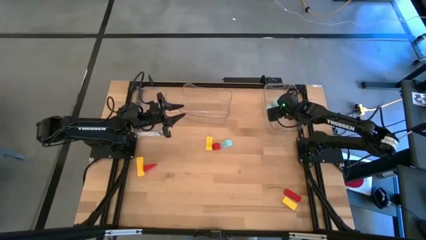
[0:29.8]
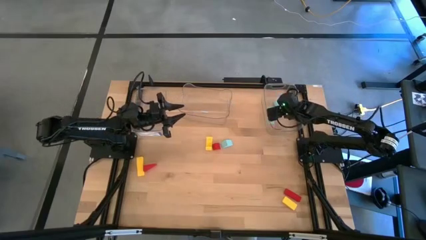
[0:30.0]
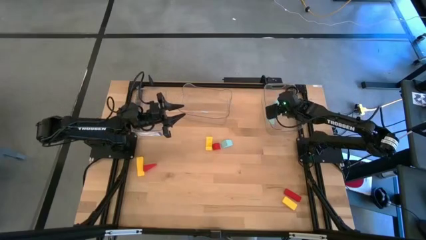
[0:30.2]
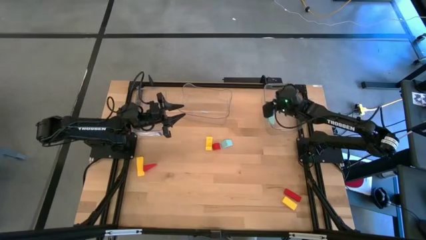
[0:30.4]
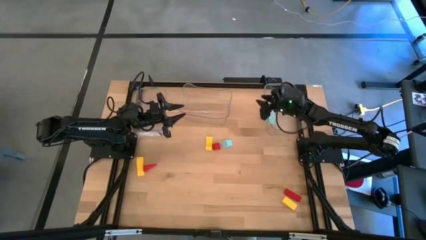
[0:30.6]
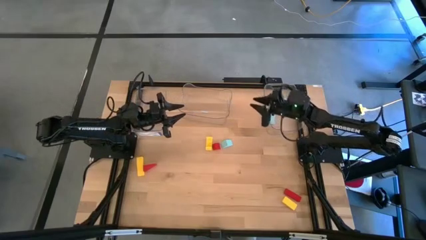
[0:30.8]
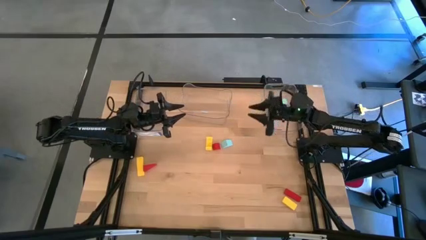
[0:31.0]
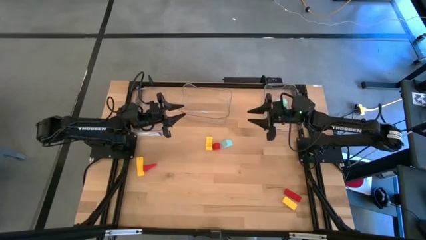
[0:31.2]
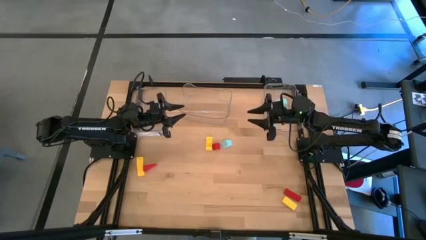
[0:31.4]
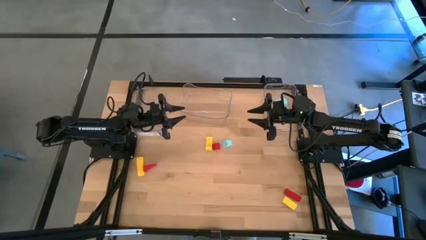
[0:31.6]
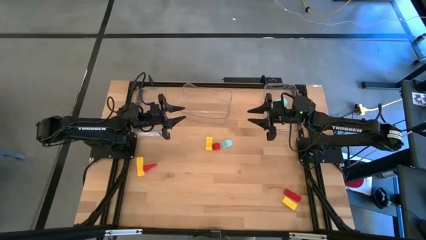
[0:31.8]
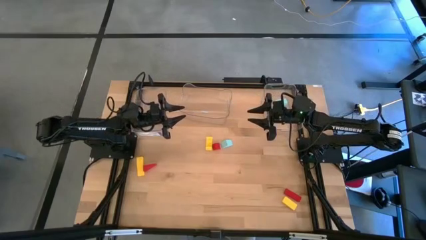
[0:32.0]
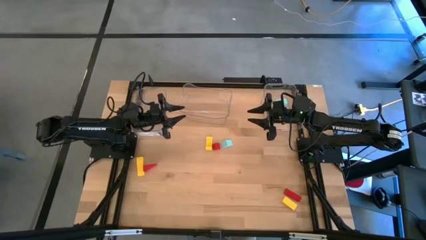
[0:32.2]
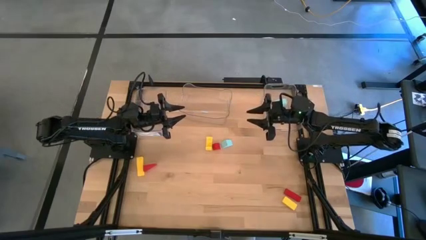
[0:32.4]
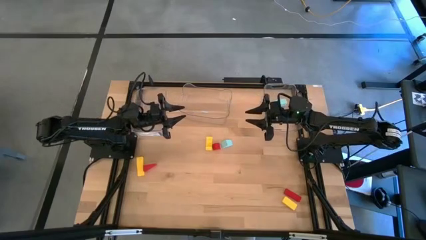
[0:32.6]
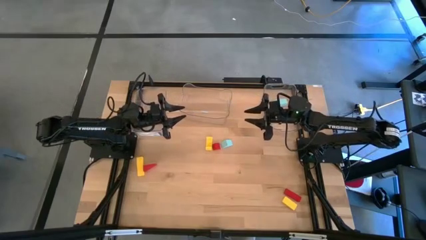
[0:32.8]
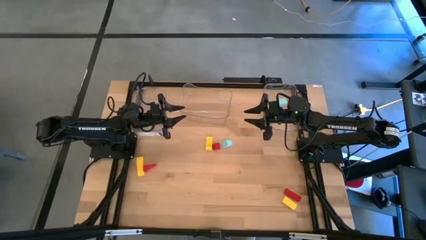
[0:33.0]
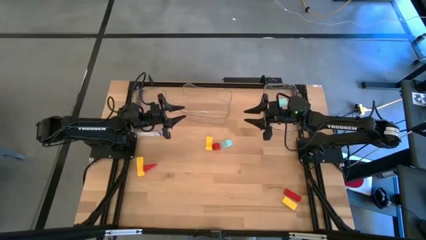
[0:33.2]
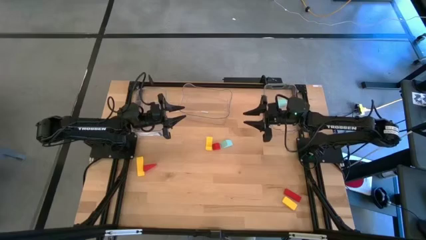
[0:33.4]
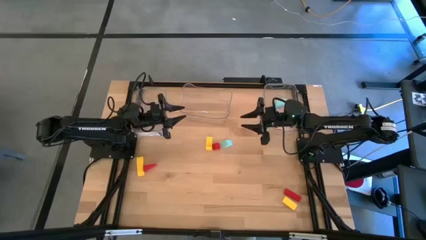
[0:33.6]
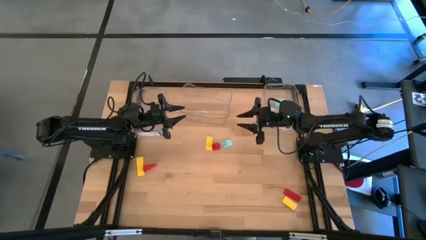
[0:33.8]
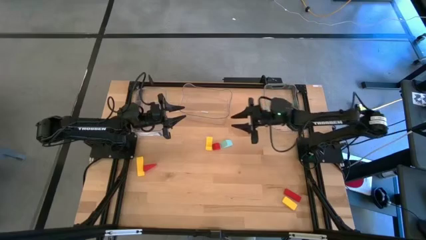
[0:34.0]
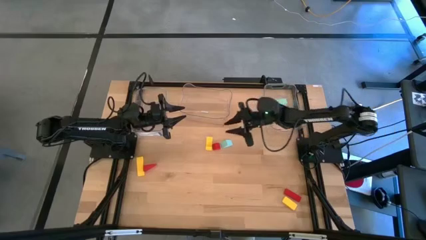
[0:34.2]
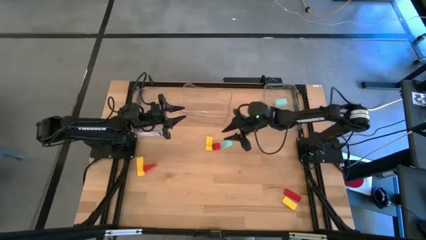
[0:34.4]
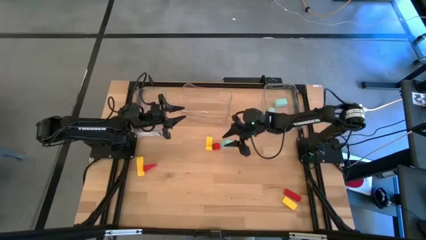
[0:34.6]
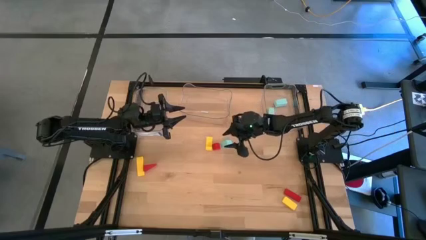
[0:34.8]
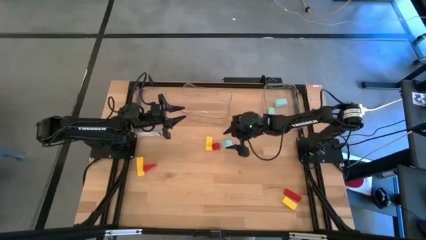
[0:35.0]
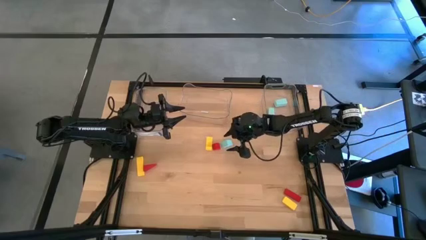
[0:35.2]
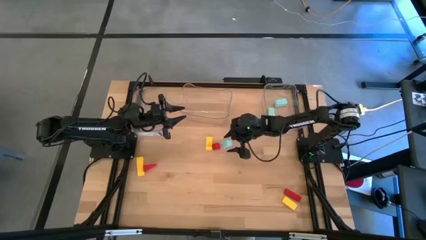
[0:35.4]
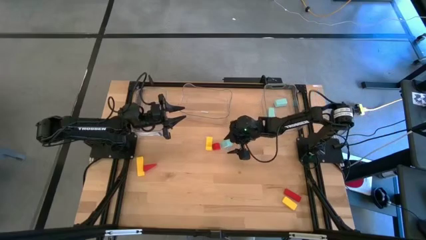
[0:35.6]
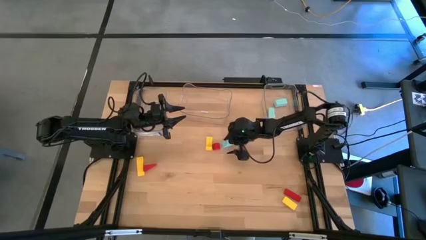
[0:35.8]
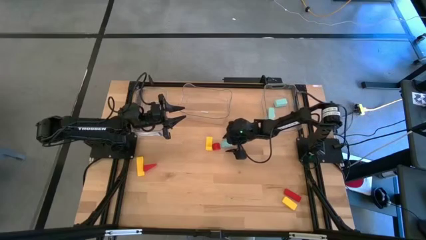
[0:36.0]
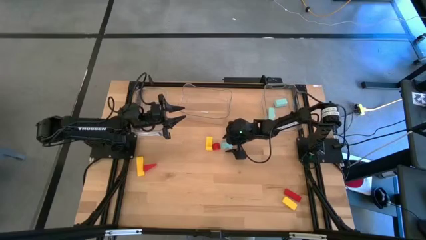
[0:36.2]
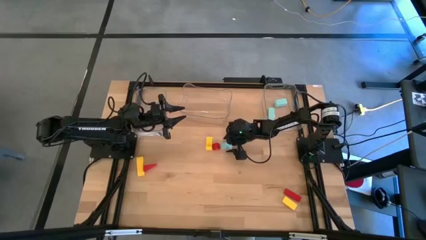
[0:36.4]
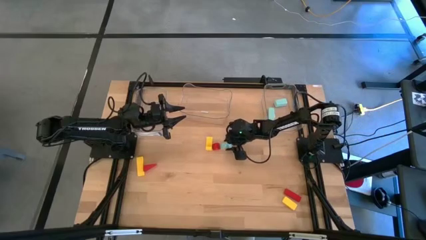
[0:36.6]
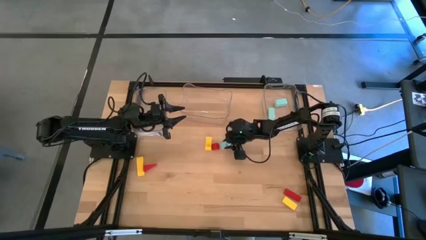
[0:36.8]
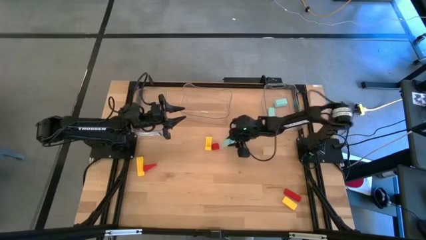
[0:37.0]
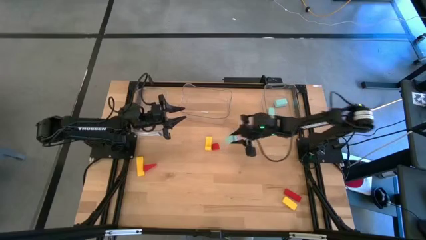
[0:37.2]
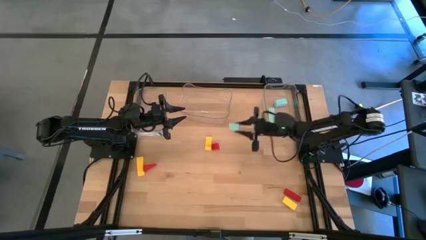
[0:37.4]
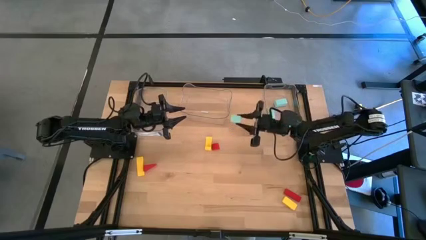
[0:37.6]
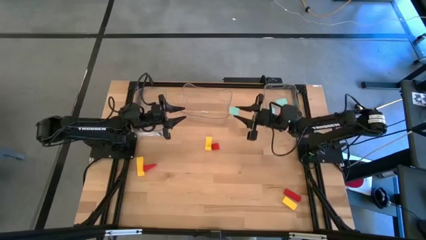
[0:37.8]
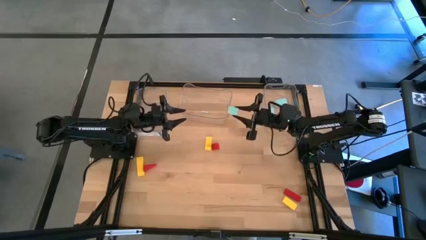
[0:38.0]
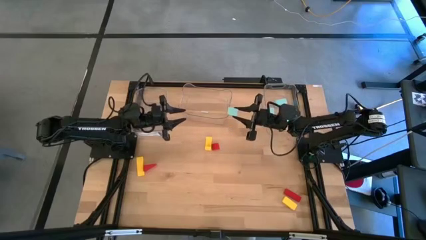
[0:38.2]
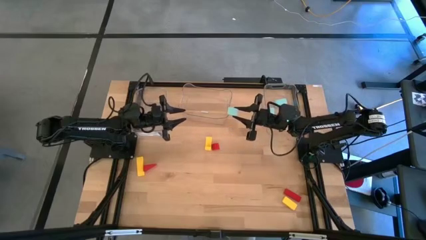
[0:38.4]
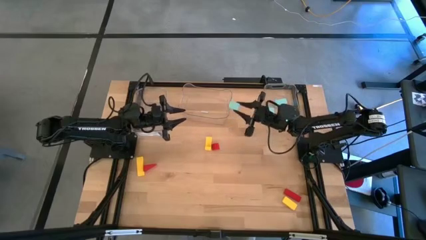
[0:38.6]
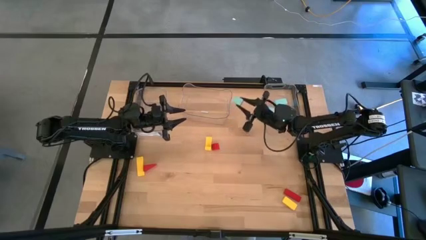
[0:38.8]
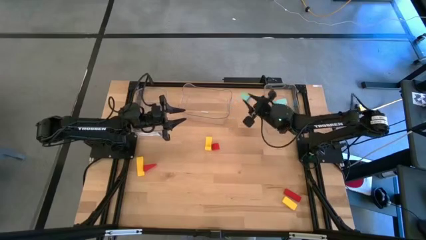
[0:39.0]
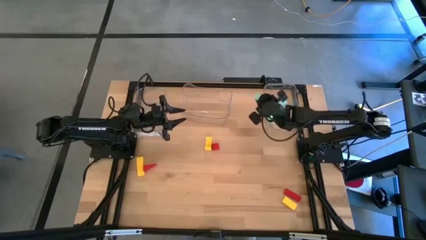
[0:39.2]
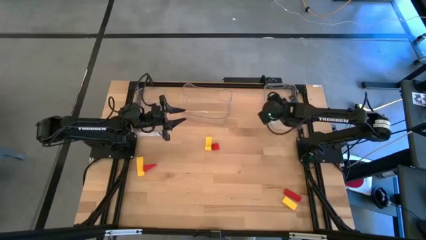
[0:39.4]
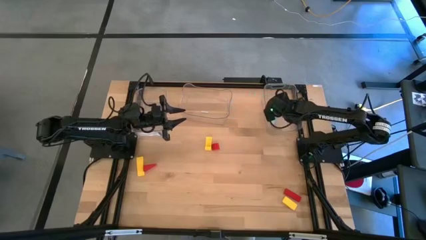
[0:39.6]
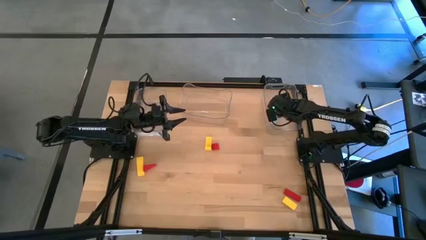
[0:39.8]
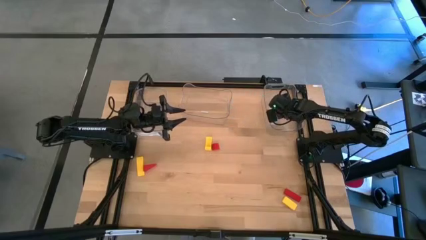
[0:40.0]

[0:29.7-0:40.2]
Task: Sort & place blocks by color
Put the blue block into the right transparent bin

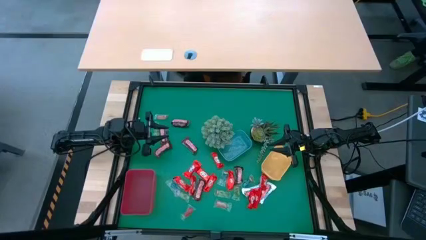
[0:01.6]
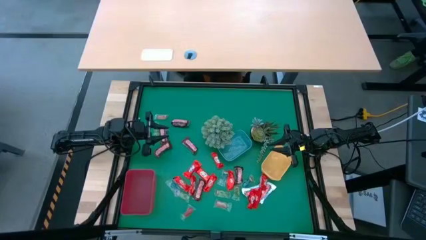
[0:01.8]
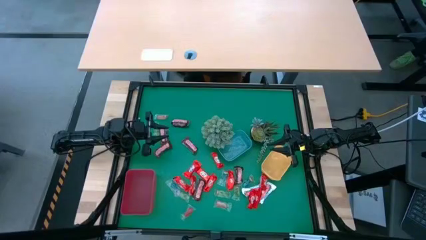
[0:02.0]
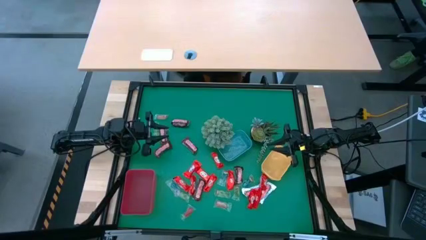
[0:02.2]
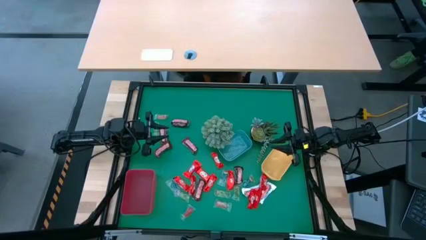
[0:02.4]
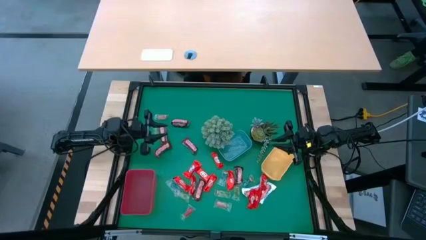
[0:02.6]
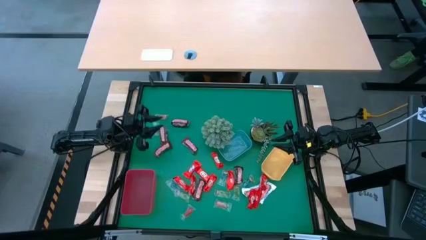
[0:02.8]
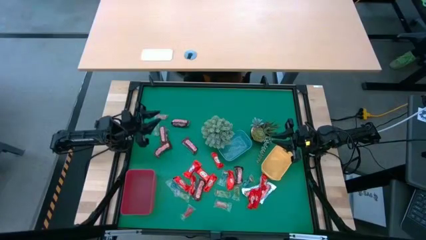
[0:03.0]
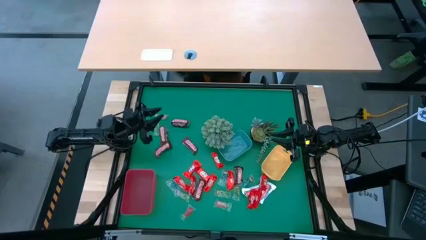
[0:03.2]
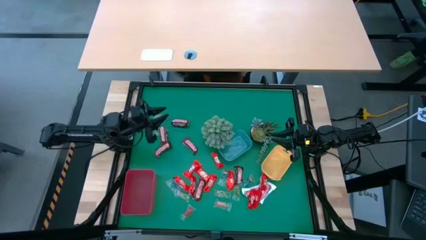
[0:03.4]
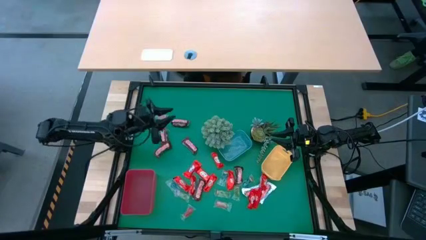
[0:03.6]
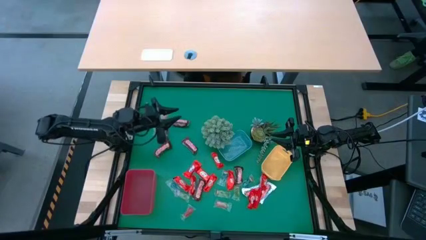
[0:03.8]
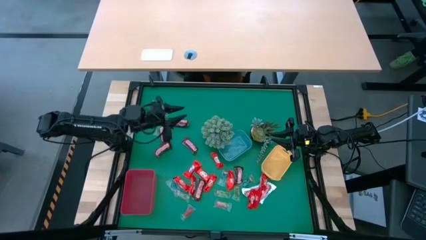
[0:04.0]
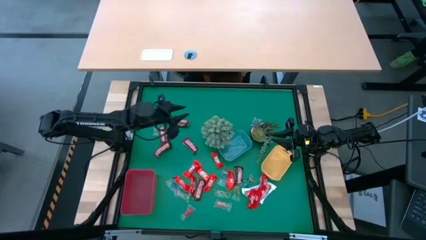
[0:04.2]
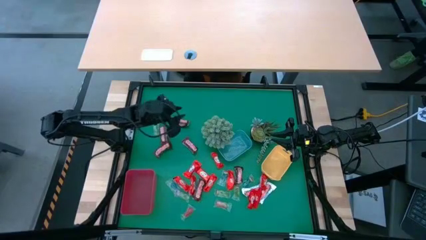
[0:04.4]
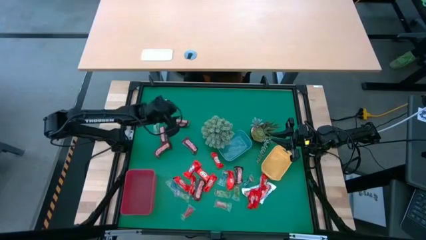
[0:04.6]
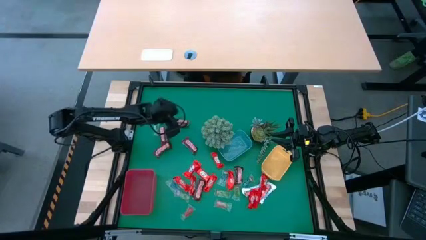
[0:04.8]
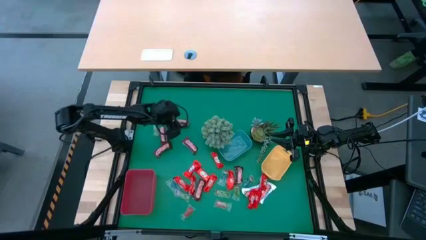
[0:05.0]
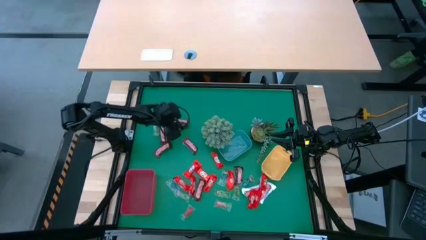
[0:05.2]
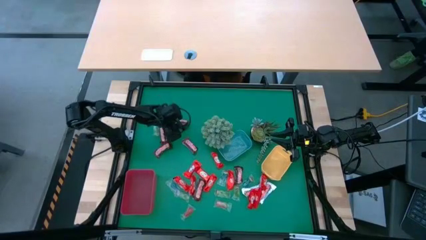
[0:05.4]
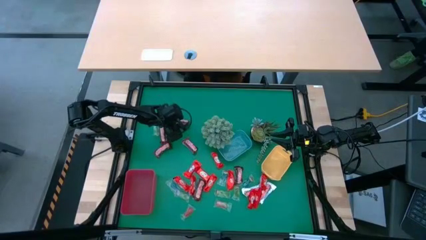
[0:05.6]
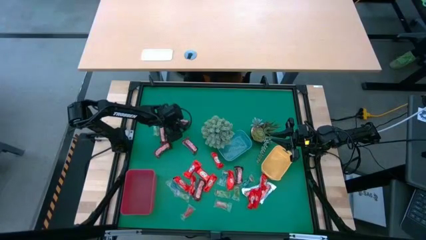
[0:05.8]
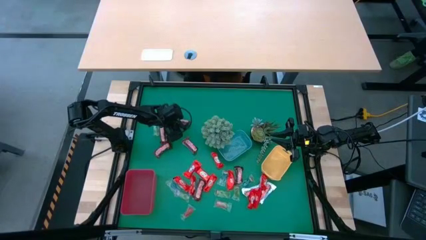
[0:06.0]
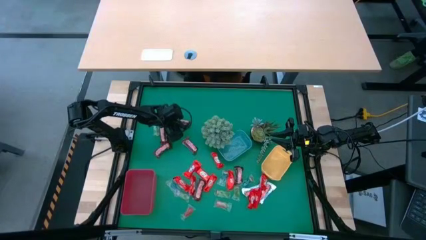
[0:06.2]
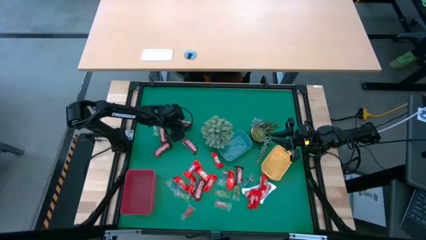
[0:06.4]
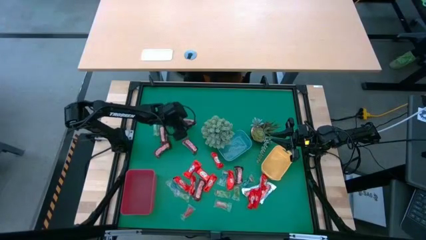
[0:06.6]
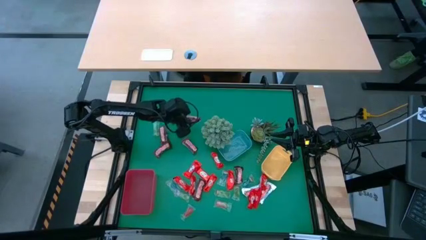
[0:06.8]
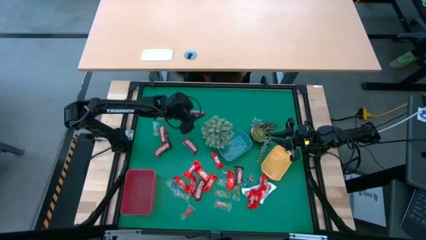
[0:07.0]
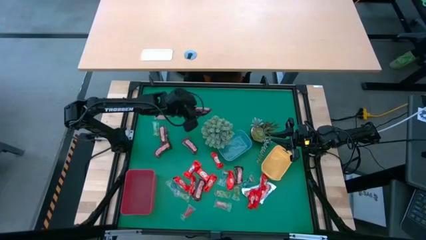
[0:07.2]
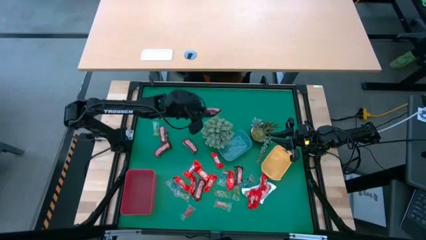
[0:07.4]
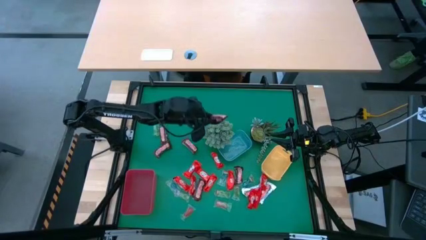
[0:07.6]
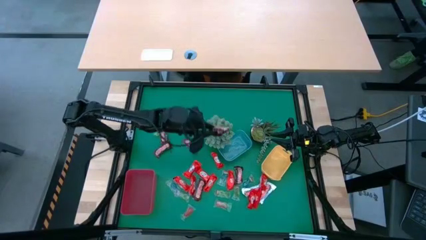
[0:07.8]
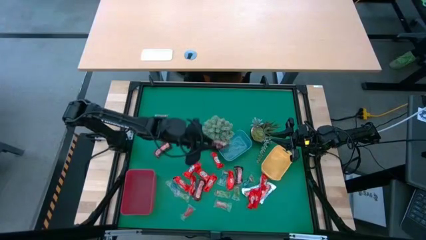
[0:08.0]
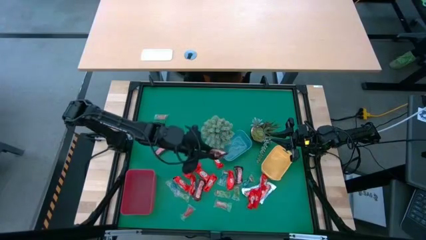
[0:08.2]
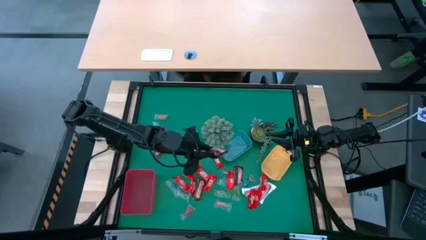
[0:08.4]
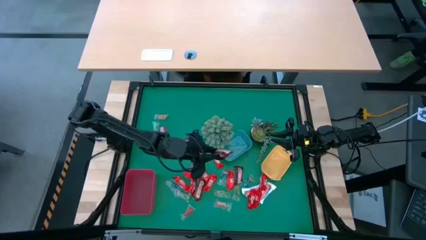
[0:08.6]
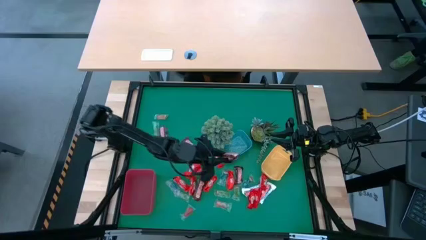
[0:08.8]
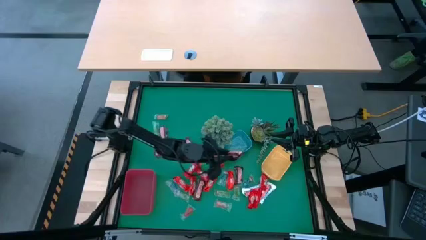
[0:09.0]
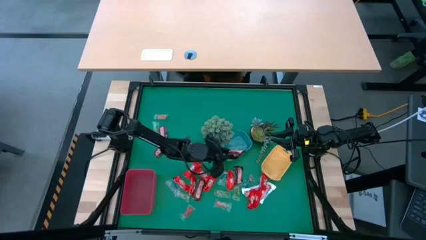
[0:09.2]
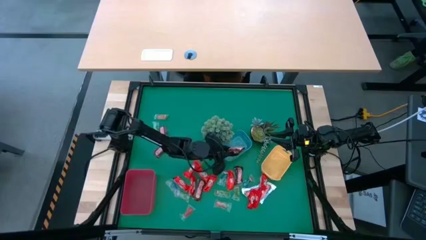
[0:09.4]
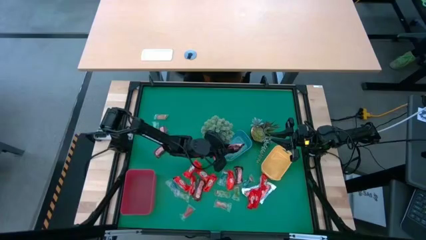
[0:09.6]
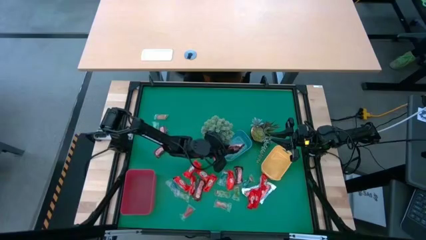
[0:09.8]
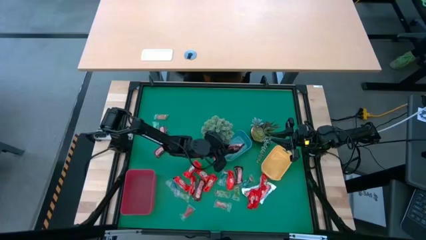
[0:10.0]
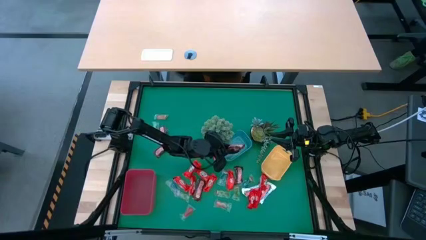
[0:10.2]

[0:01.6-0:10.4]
Task: Organize candy in baskets
Put the brown chocolate into the blue bin
